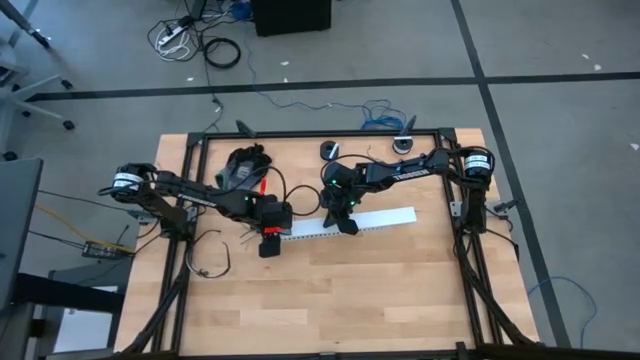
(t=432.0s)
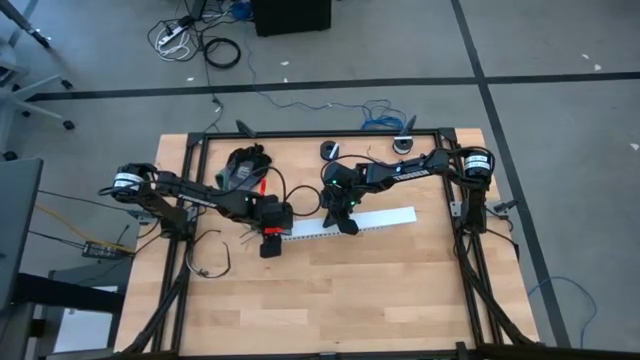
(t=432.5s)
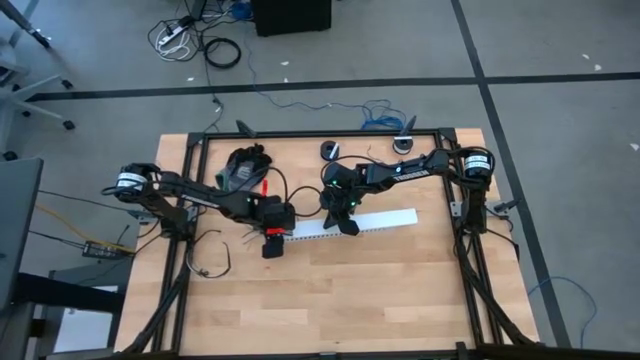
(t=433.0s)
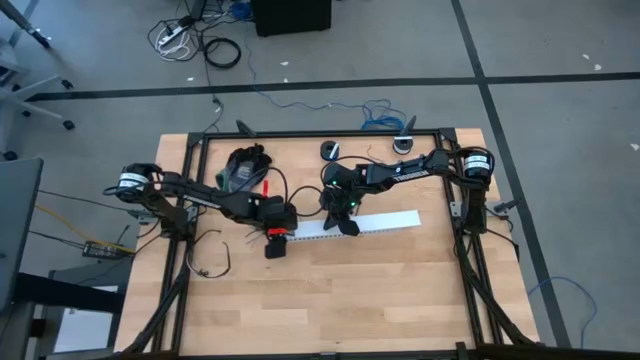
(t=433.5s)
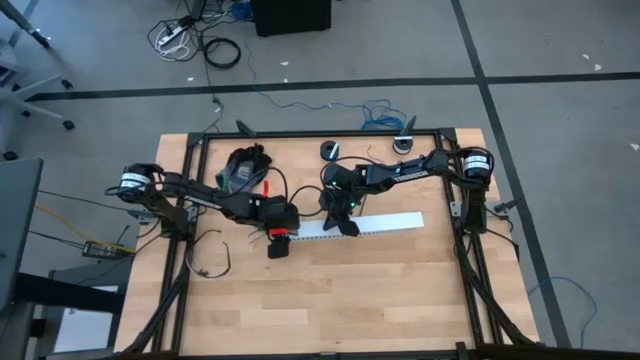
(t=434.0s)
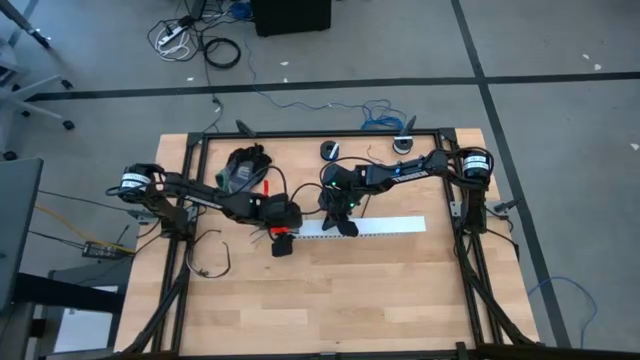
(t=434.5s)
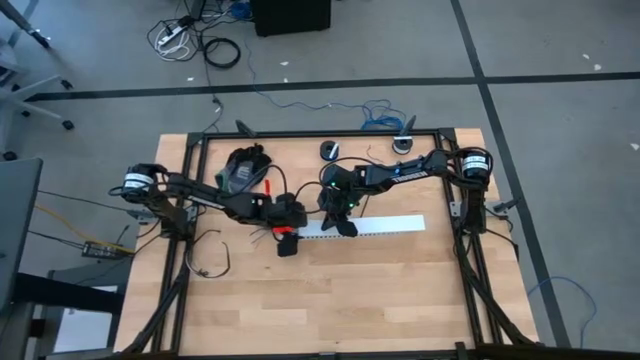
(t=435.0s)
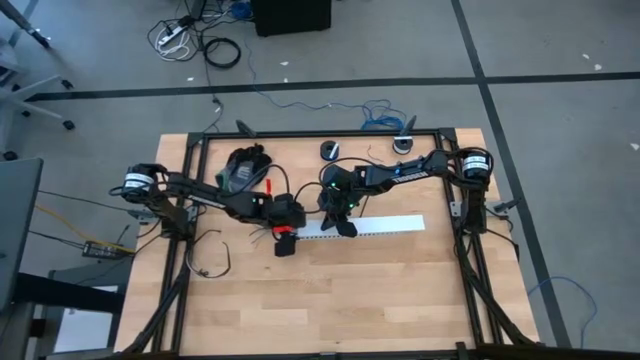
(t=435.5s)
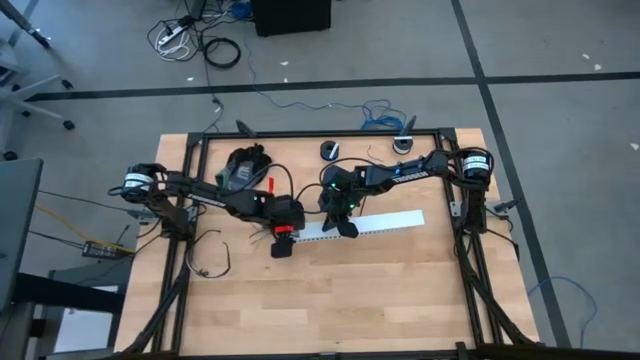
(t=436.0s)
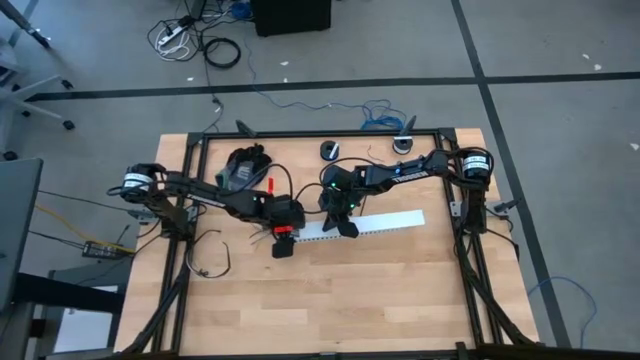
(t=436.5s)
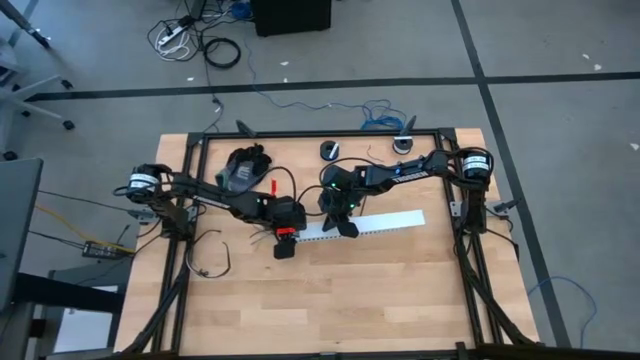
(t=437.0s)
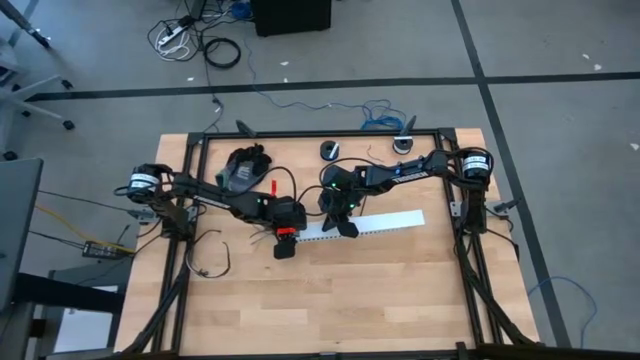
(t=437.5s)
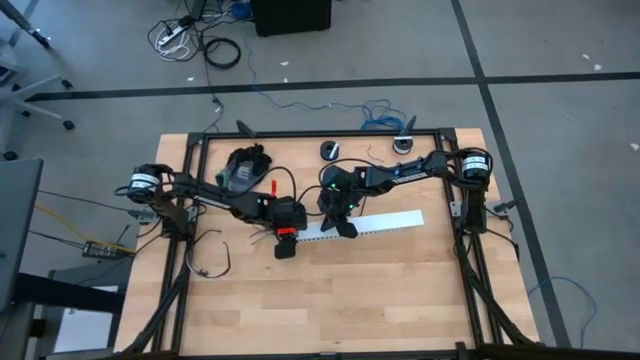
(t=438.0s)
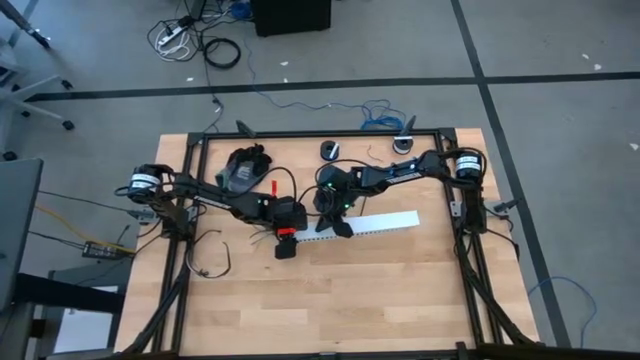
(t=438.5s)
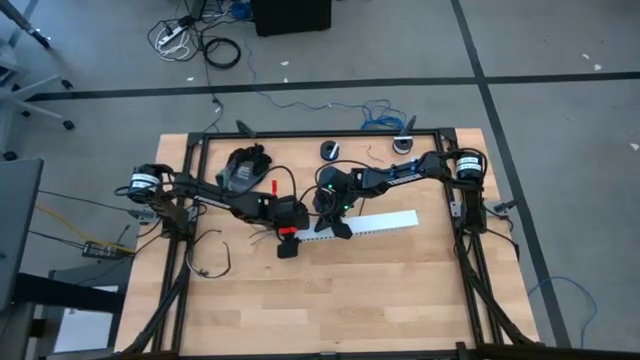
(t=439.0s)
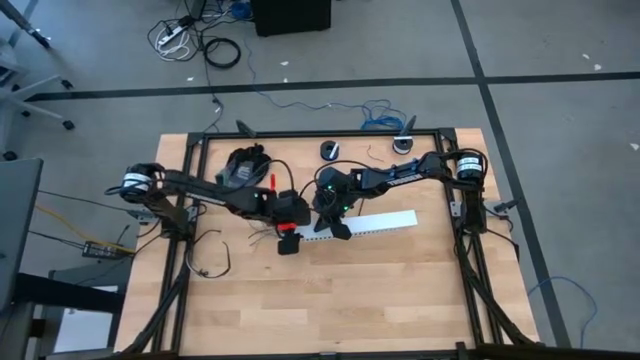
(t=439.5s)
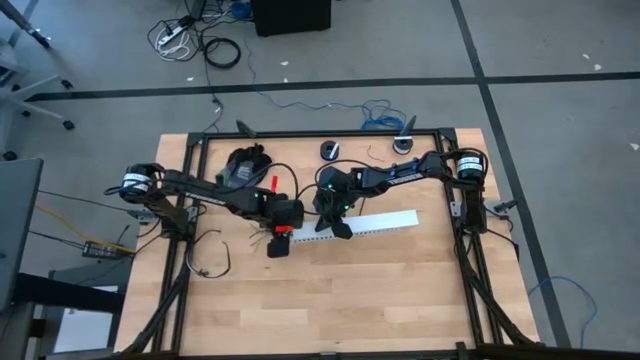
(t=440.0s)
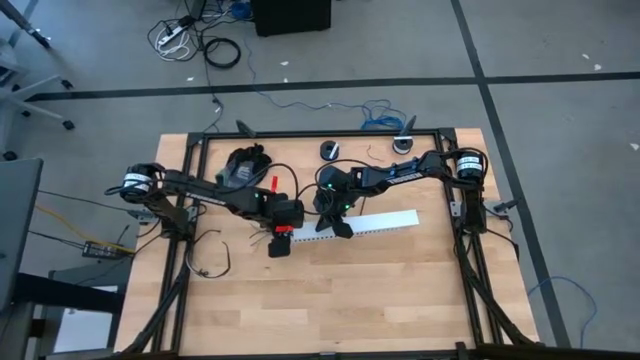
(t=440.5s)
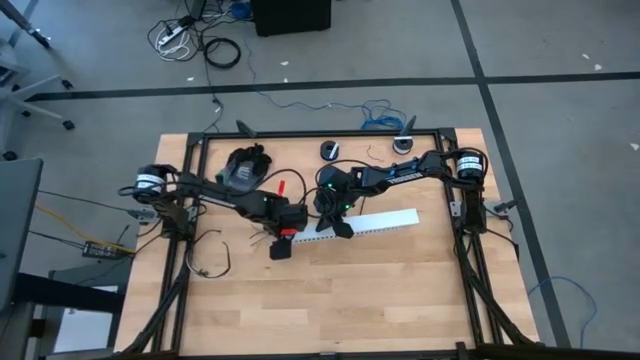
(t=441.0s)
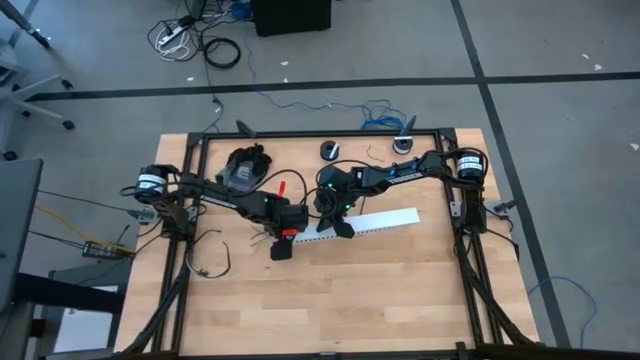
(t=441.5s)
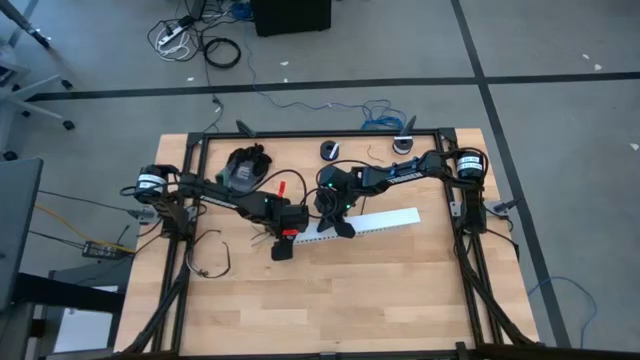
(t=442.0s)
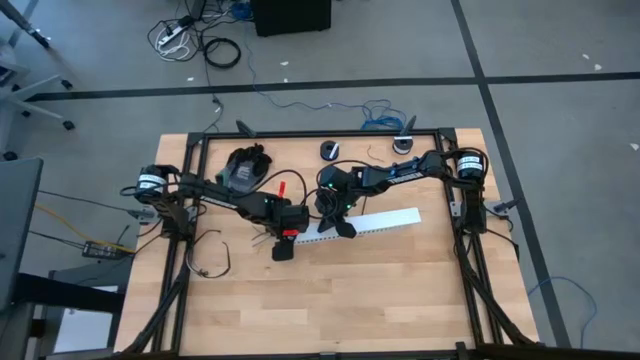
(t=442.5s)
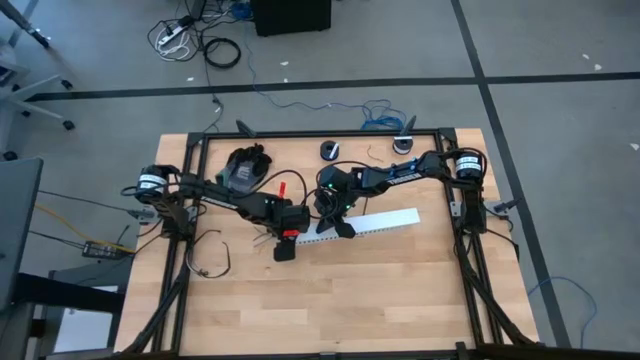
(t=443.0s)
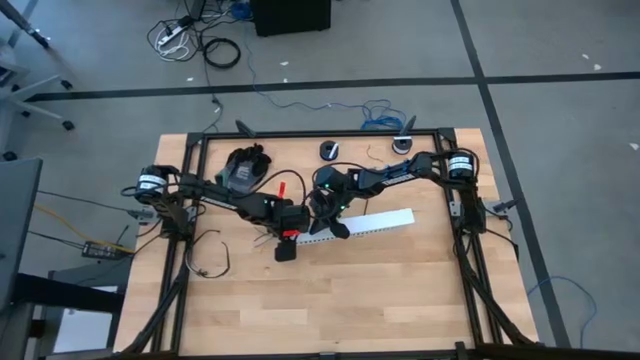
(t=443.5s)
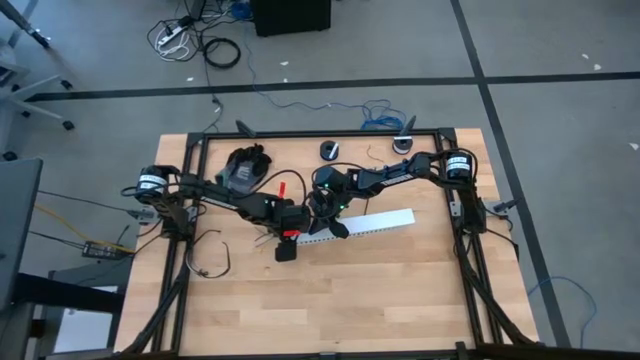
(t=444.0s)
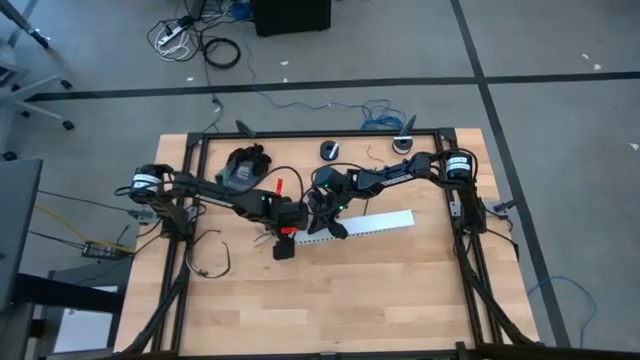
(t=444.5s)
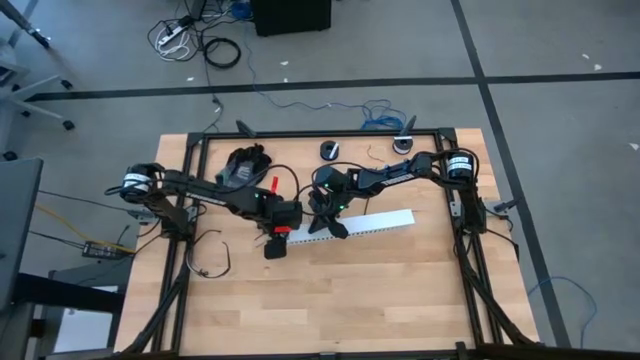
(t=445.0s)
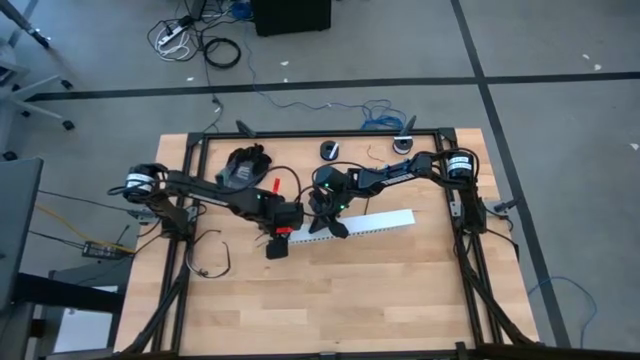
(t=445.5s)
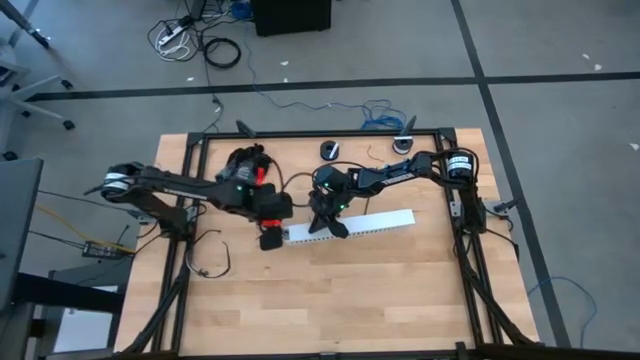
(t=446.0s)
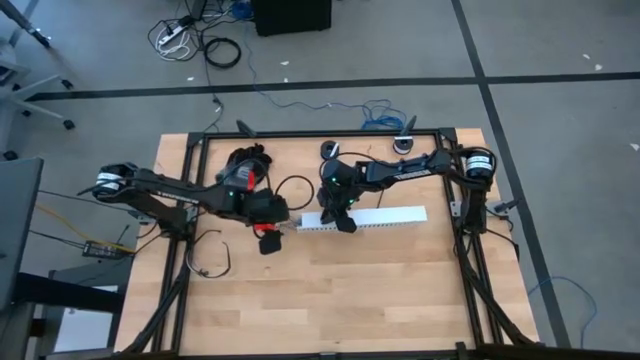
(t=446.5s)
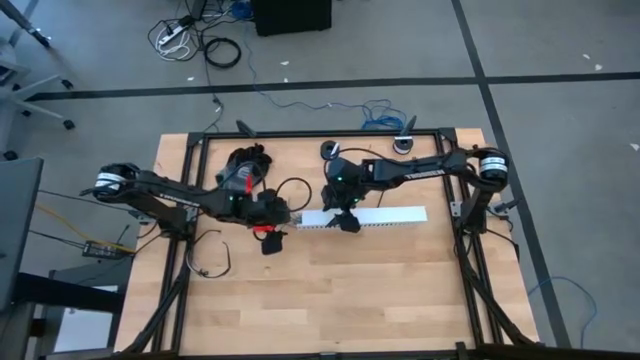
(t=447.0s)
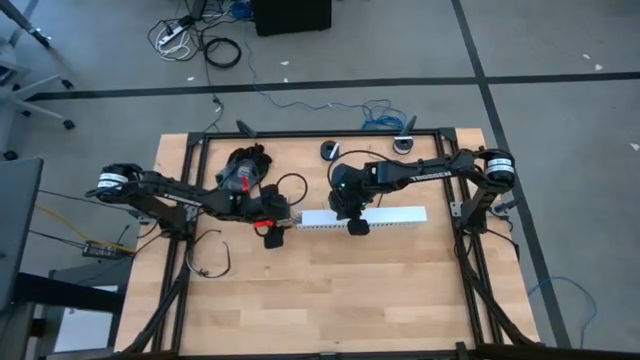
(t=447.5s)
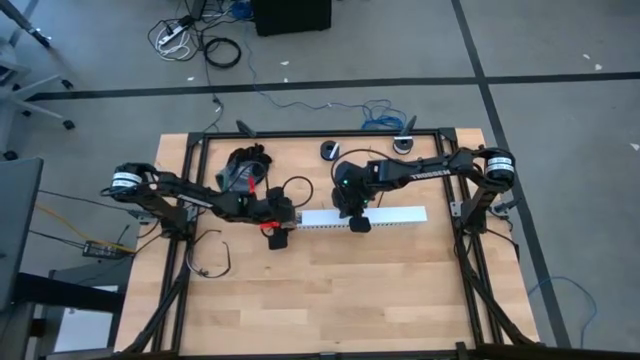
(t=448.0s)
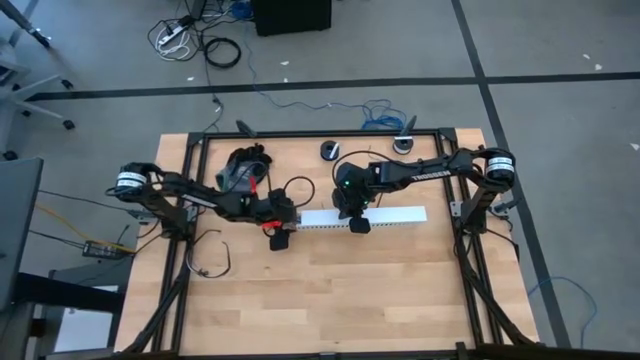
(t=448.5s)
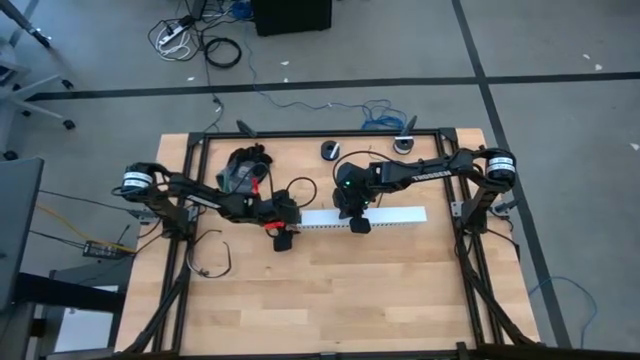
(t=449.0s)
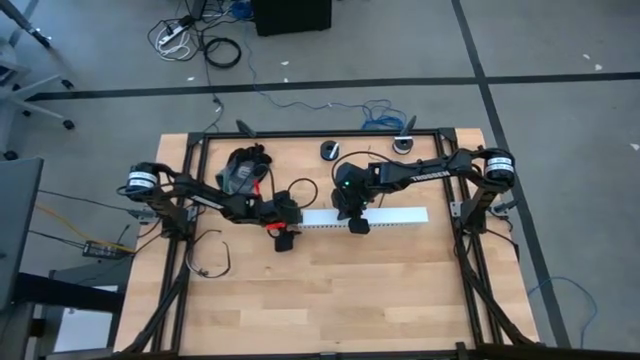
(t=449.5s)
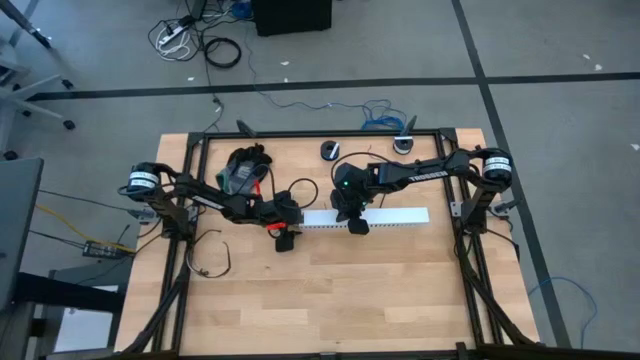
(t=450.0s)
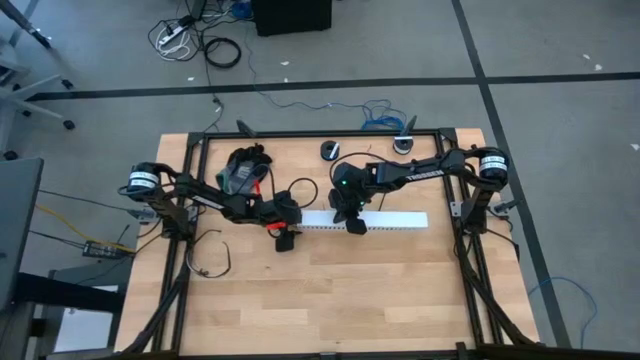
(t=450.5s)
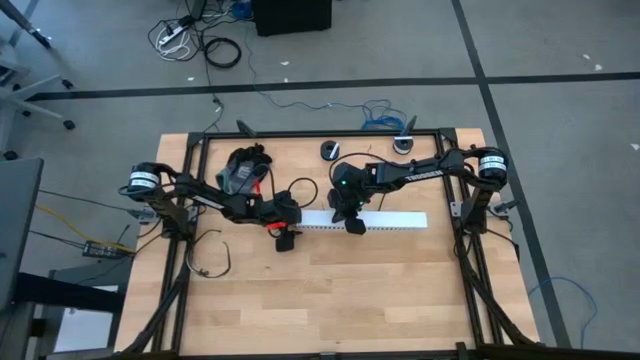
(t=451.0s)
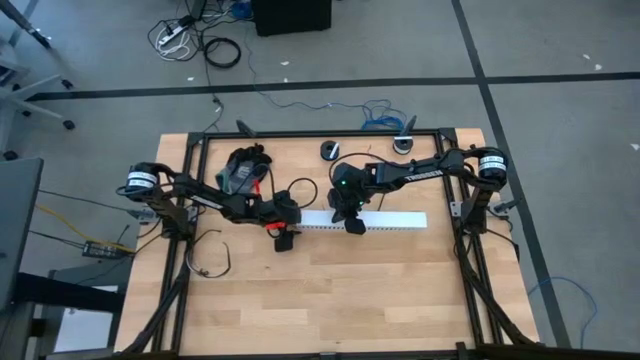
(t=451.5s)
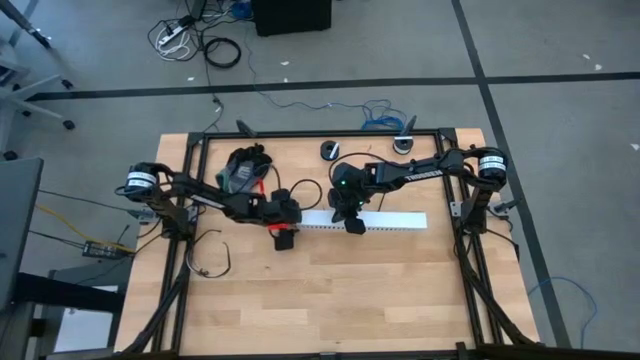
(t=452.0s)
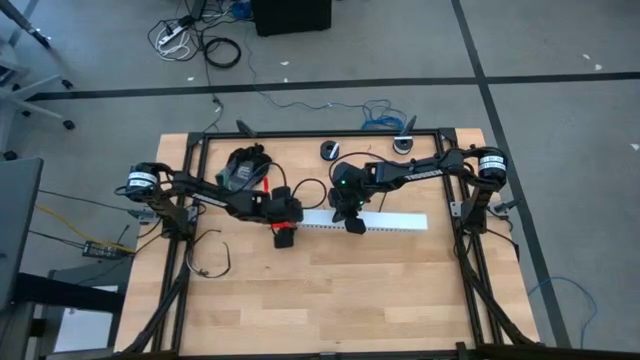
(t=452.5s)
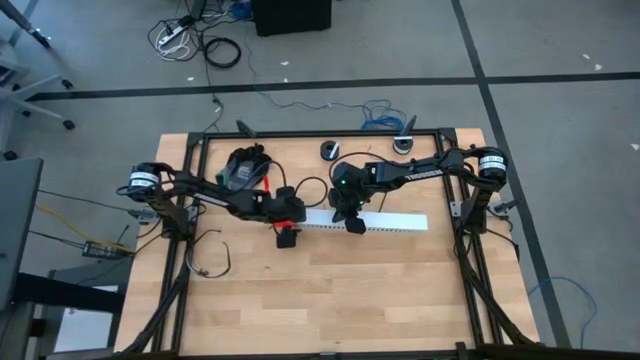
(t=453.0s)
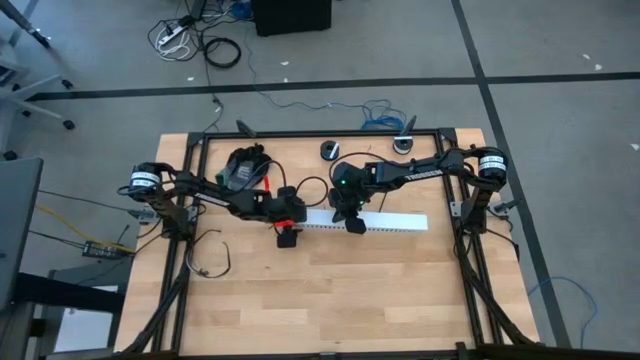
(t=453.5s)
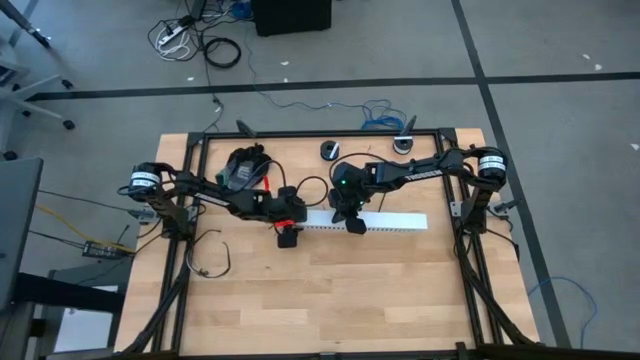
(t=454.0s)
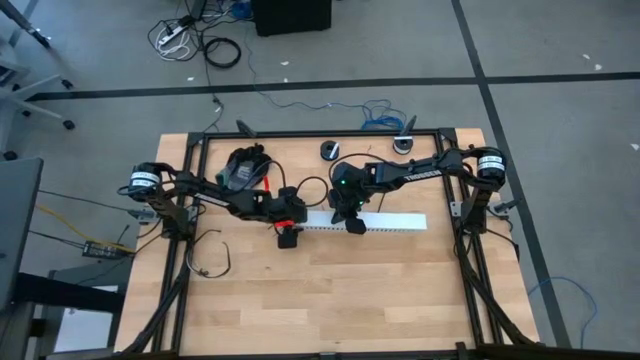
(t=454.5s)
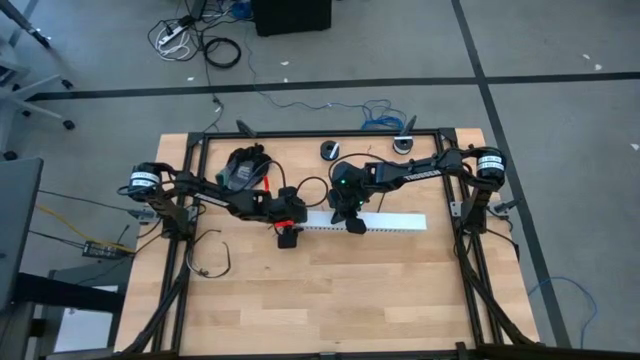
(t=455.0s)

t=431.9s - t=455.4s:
Task: Ziptie cables
Close the white cable duct
